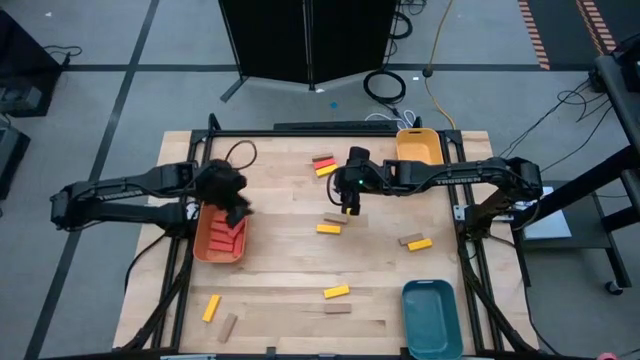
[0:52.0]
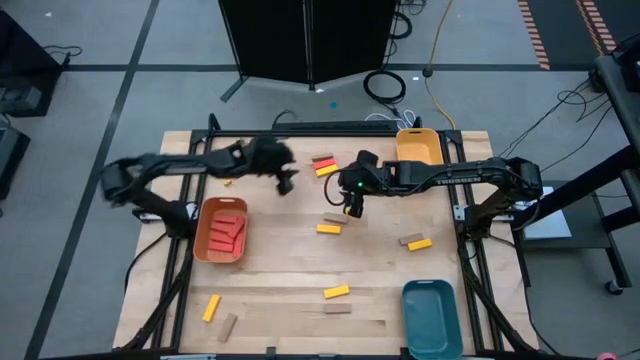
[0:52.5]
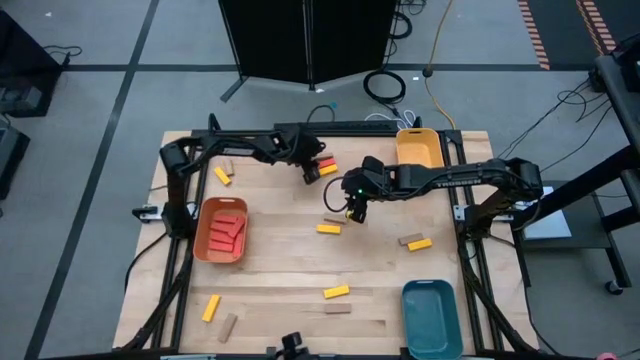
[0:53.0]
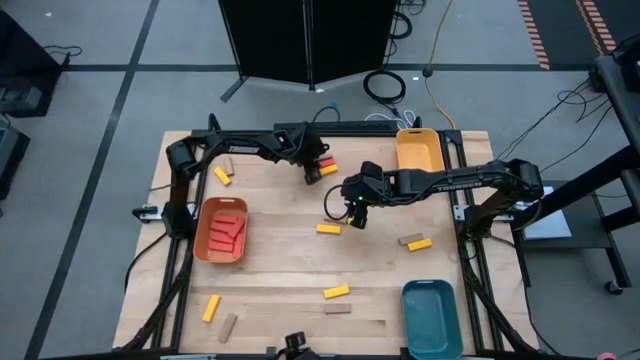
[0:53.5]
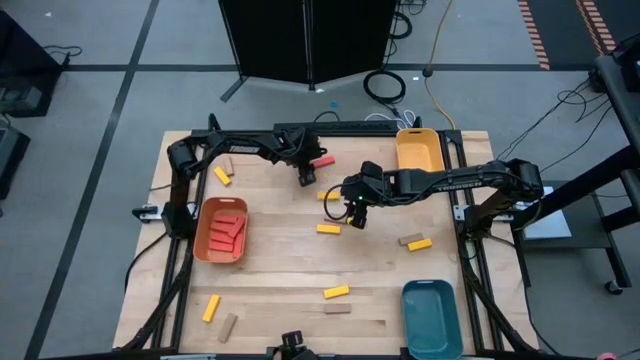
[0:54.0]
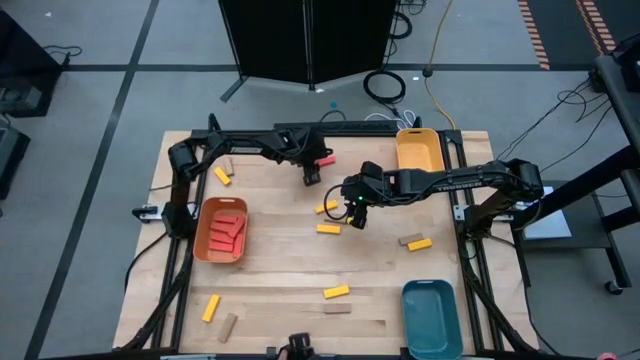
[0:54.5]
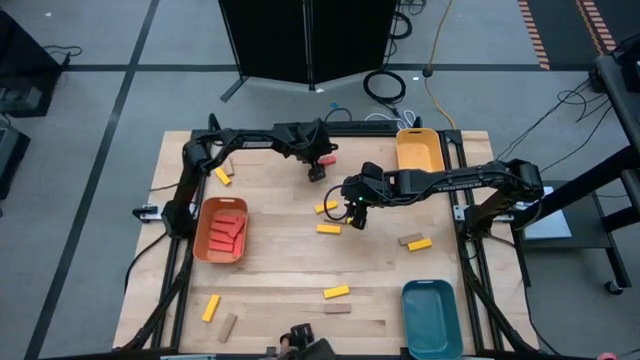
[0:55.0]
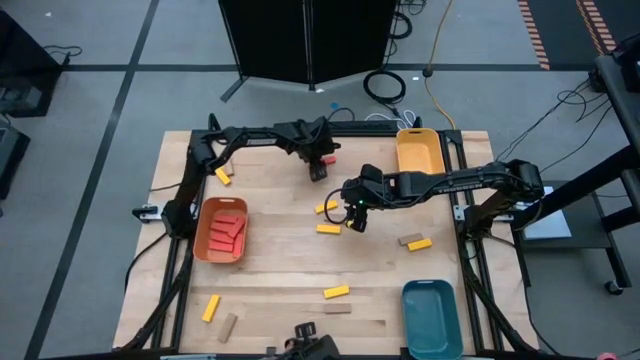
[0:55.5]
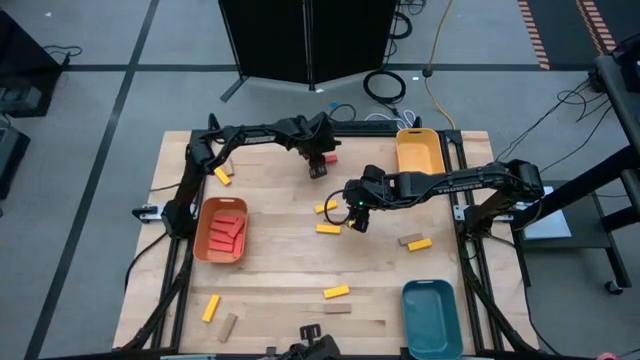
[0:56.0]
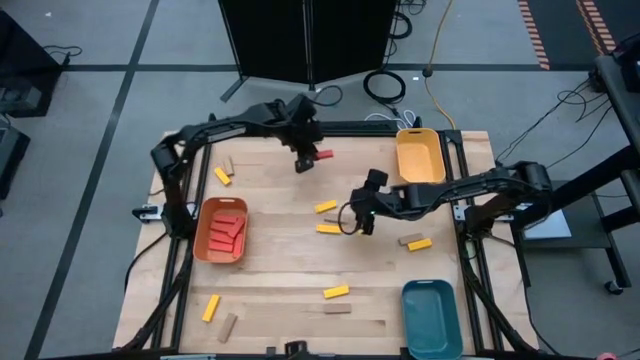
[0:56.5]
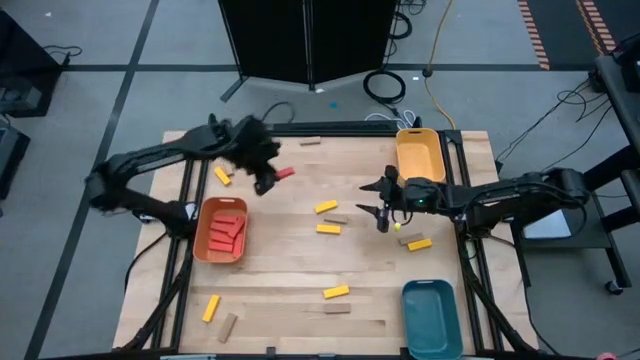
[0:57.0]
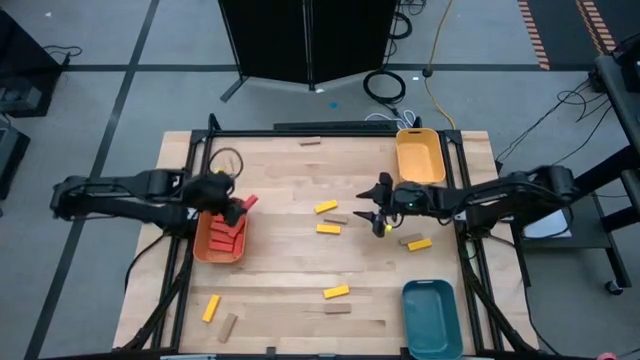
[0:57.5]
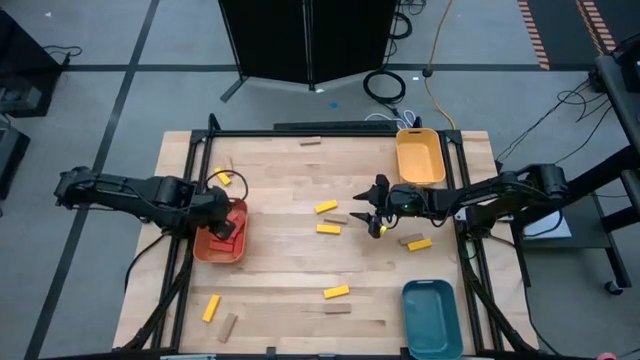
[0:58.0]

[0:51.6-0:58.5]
Task: Sort blocks
Put the orange block into the orange bin

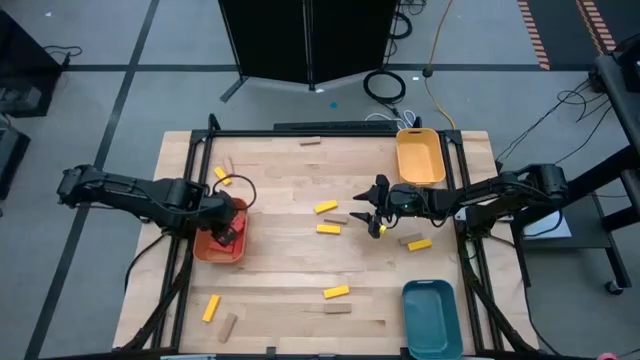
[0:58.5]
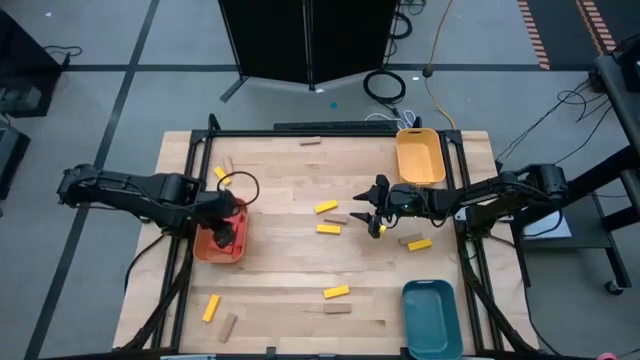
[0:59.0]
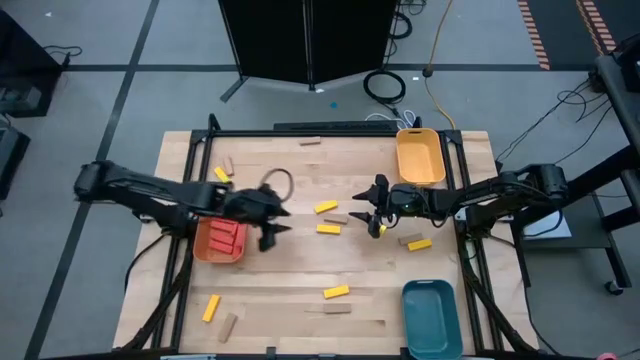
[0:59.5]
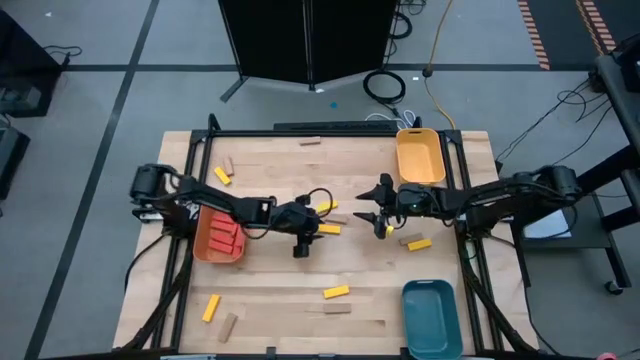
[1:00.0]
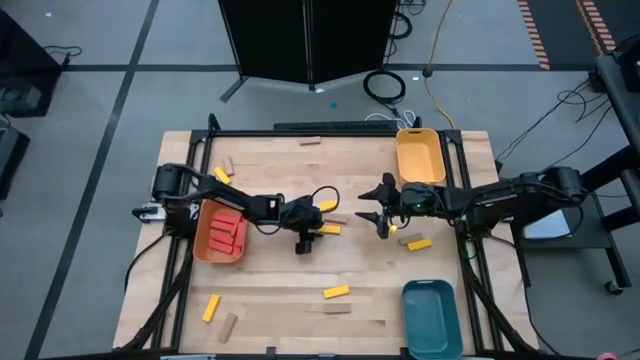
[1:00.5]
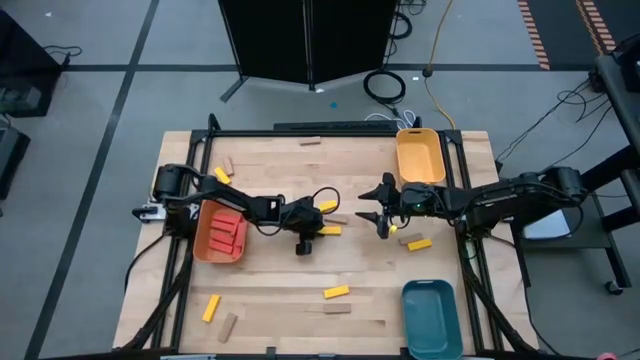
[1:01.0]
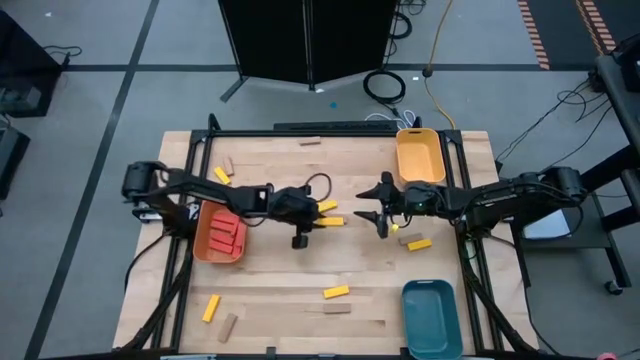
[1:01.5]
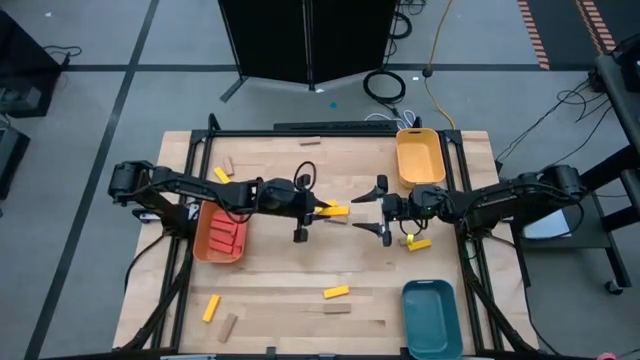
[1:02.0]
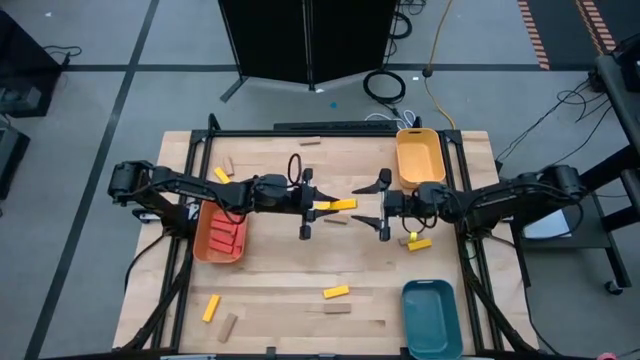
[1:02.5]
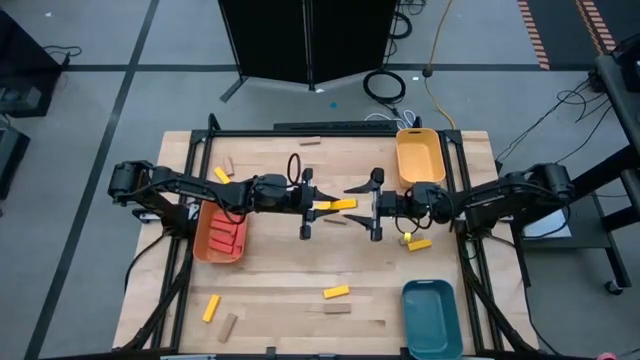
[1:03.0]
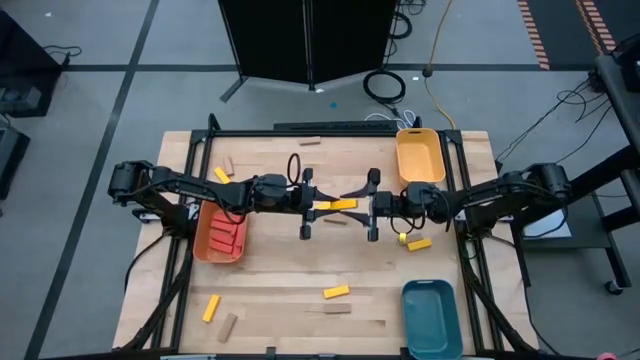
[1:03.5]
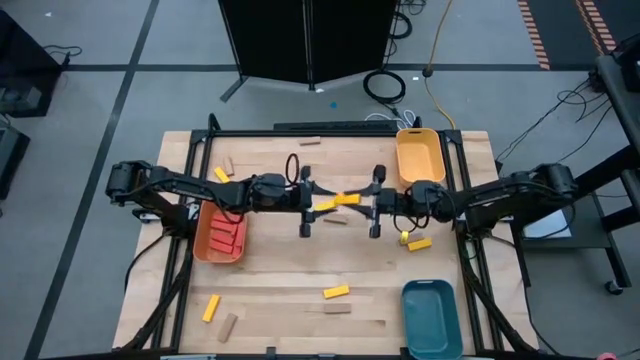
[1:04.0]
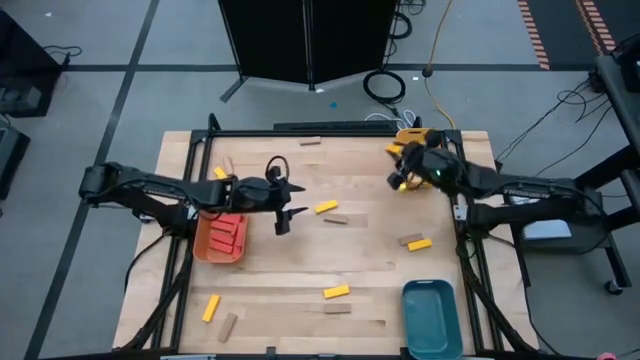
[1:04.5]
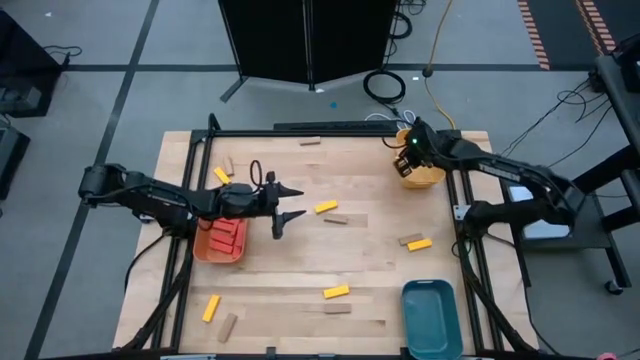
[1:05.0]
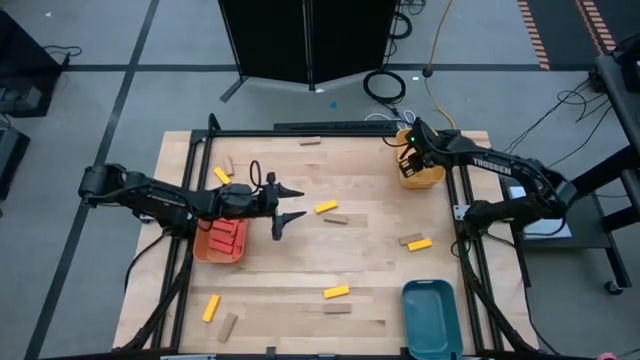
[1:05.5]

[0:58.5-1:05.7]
Put the yellow block into the yellow bin

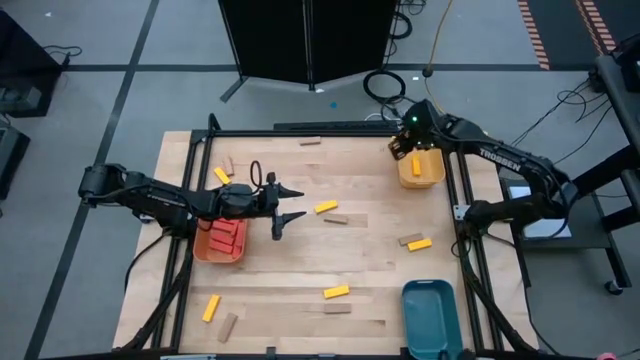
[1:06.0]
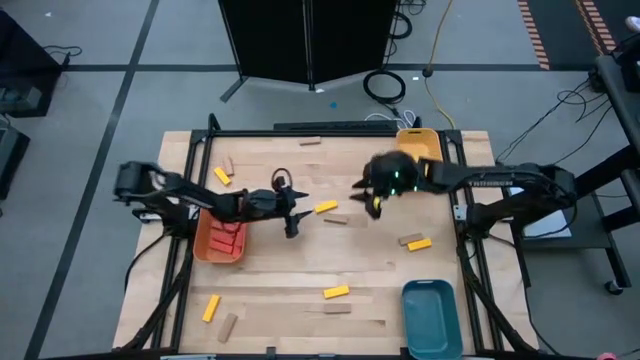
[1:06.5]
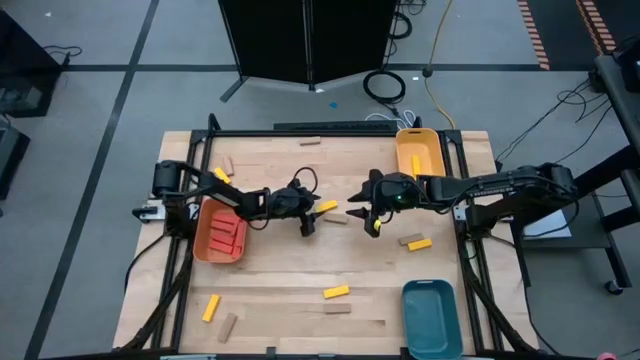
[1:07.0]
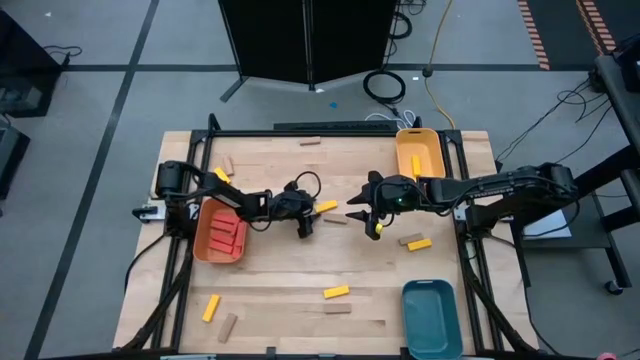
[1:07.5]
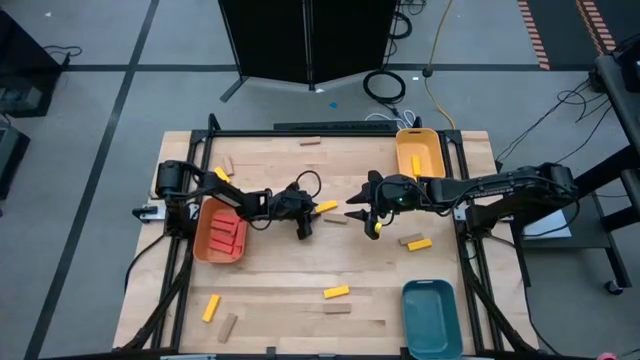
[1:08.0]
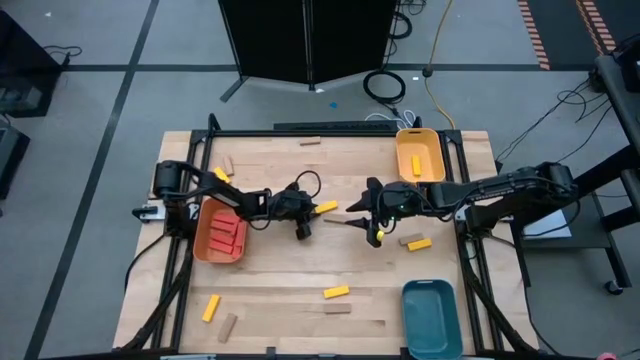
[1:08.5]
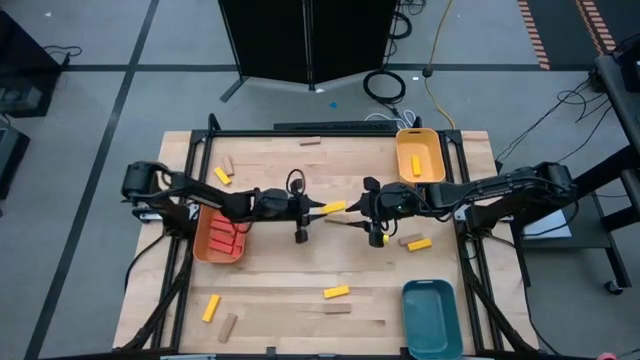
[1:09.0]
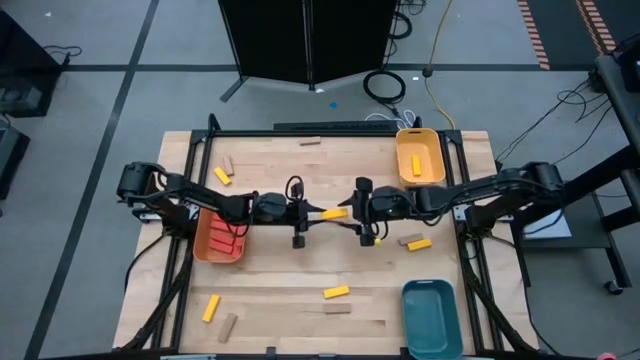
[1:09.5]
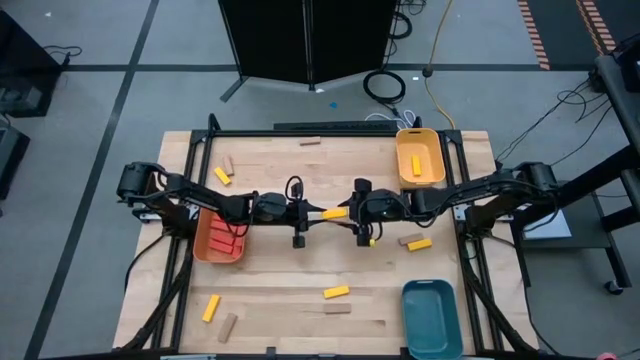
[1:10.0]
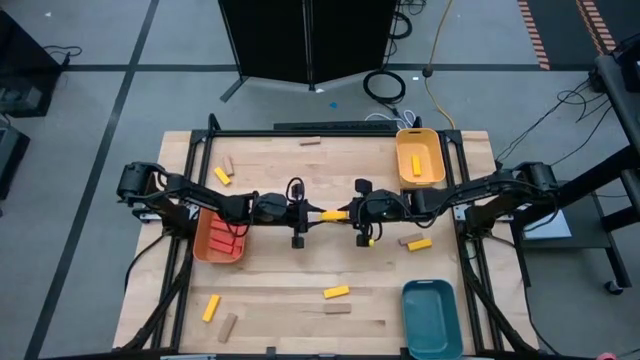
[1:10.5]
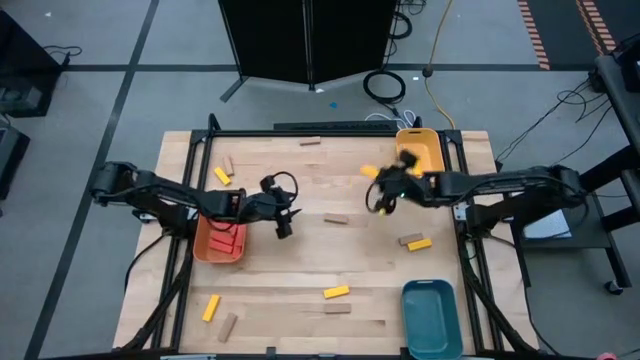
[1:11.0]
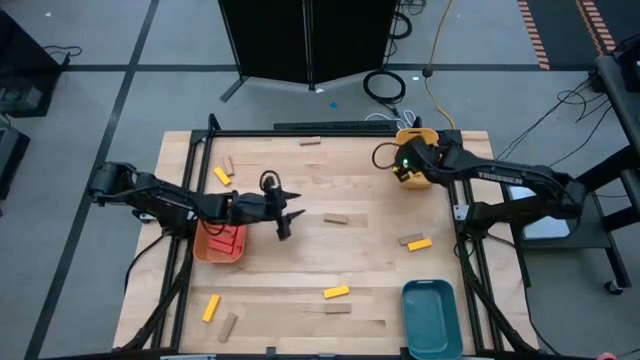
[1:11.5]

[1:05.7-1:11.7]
Put the yellow block into the yellow bin

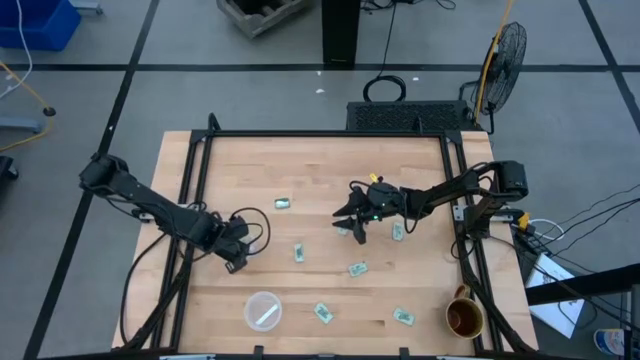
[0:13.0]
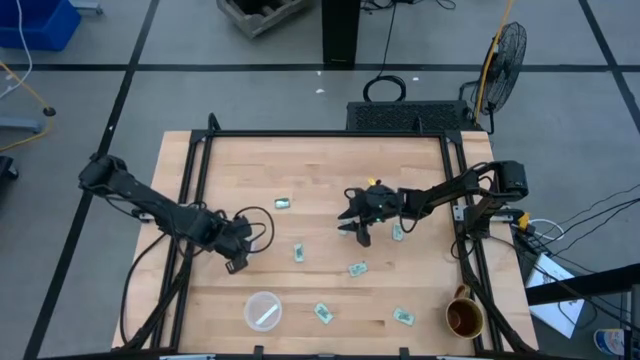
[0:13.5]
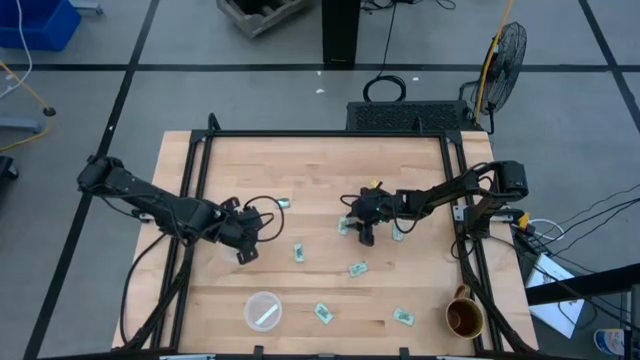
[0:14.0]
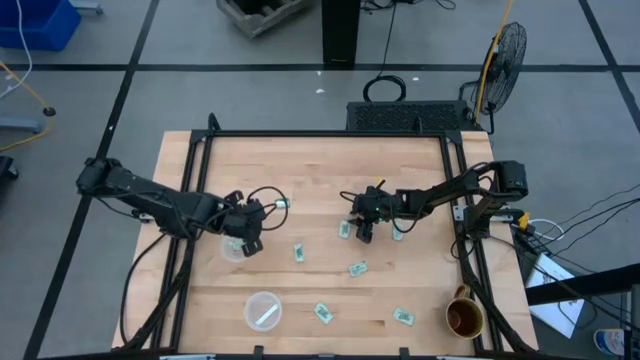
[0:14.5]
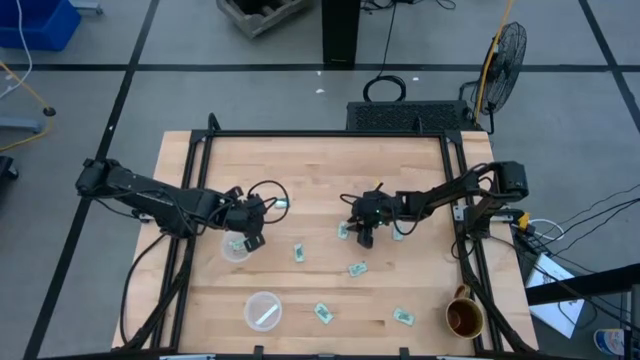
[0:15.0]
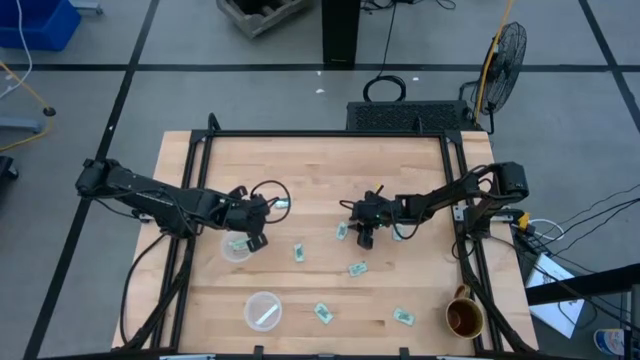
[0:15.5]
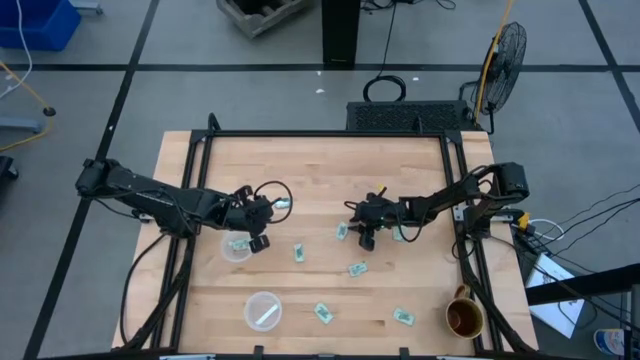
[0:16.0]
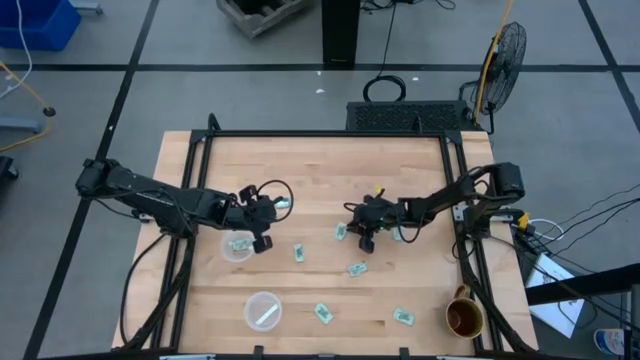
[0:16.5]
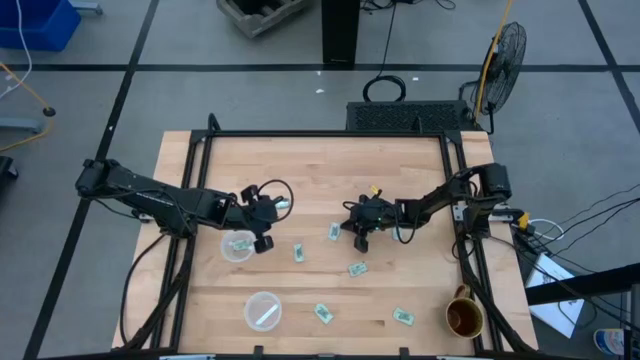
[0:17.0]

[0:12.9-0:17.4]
Task: Pick and place Stevia / Truvia into bins
Put the stevia packet into the bottom container
